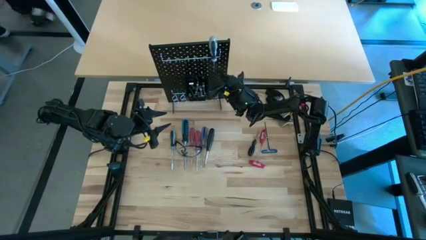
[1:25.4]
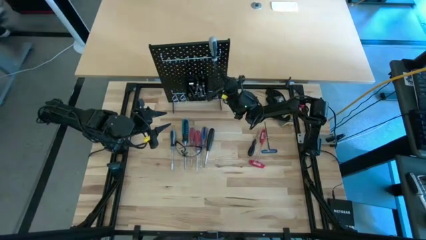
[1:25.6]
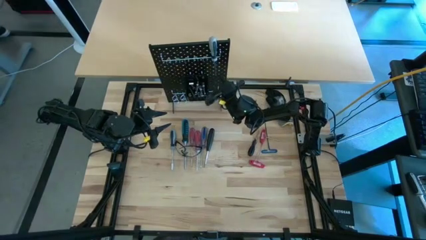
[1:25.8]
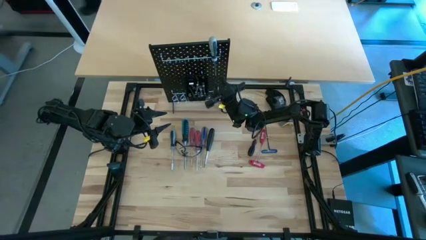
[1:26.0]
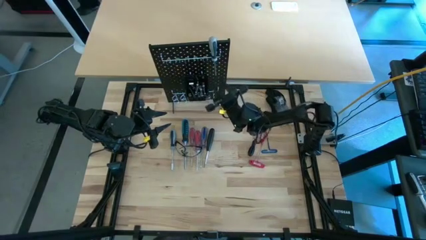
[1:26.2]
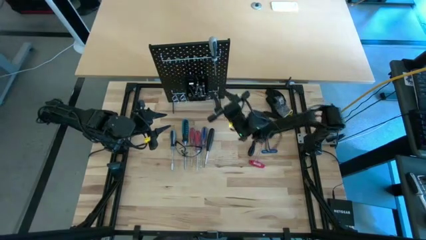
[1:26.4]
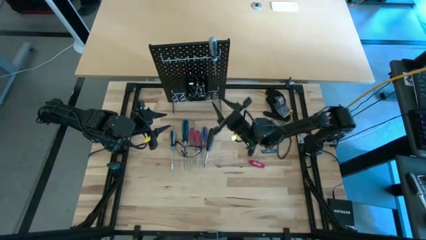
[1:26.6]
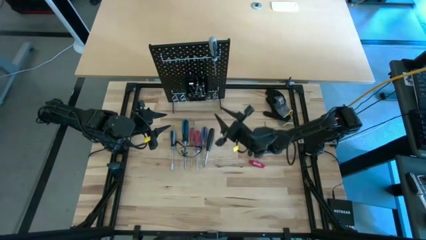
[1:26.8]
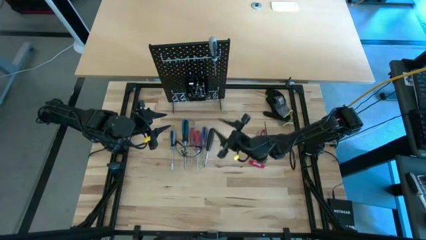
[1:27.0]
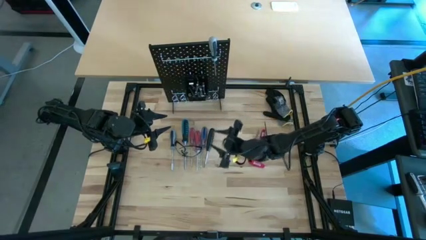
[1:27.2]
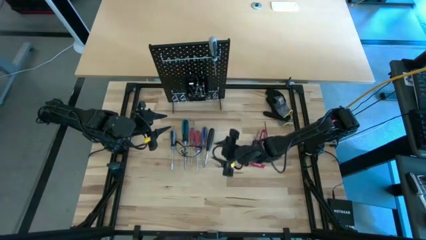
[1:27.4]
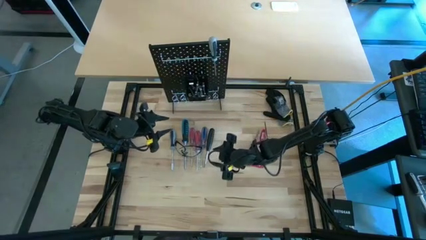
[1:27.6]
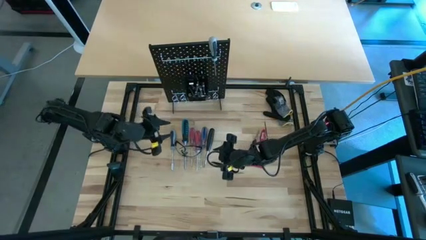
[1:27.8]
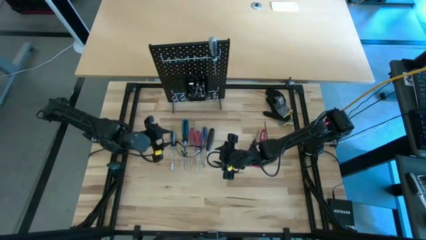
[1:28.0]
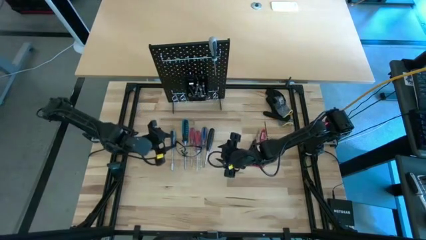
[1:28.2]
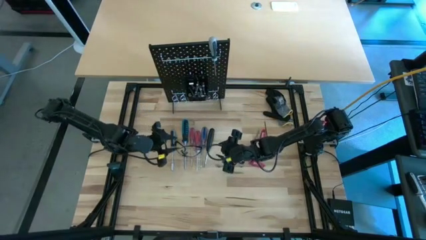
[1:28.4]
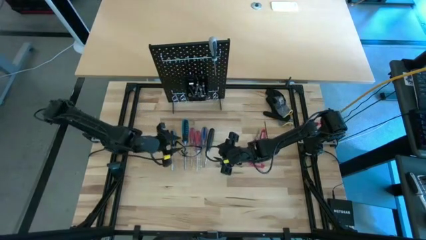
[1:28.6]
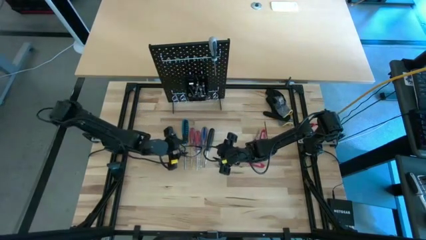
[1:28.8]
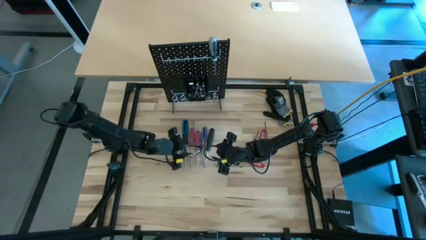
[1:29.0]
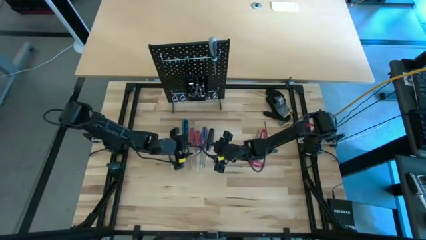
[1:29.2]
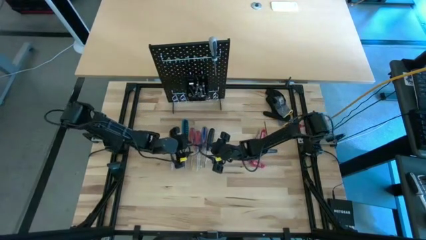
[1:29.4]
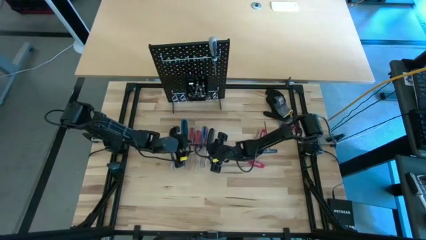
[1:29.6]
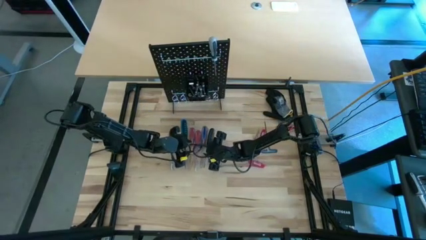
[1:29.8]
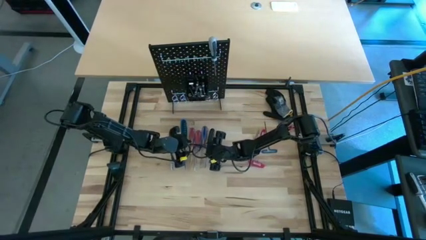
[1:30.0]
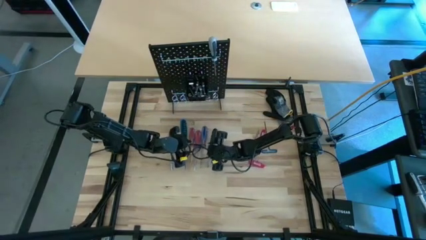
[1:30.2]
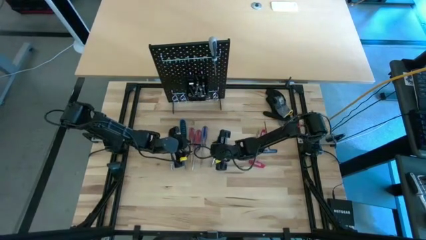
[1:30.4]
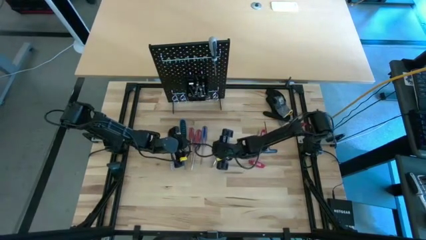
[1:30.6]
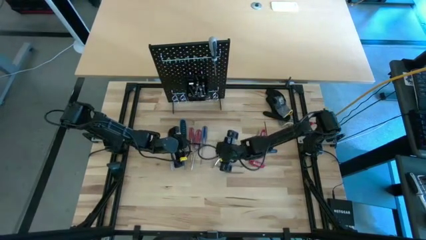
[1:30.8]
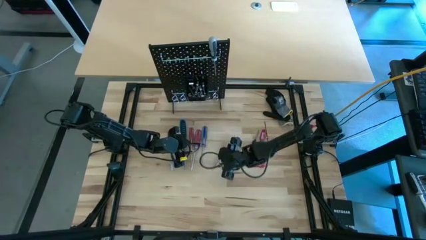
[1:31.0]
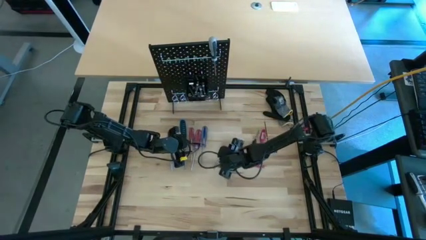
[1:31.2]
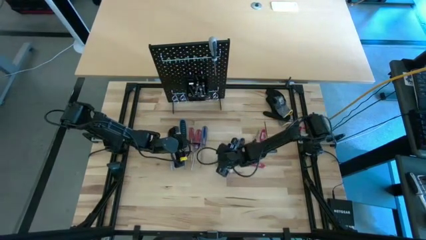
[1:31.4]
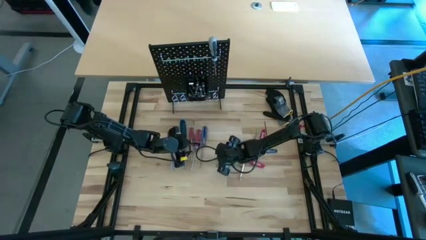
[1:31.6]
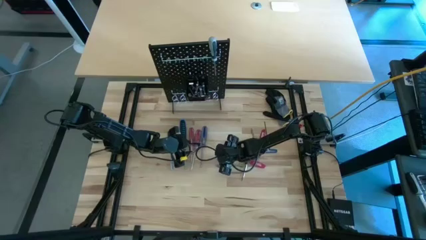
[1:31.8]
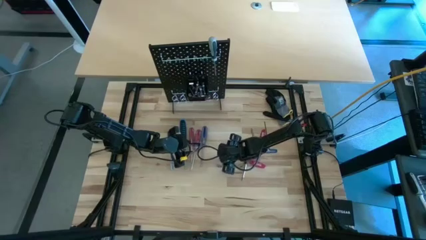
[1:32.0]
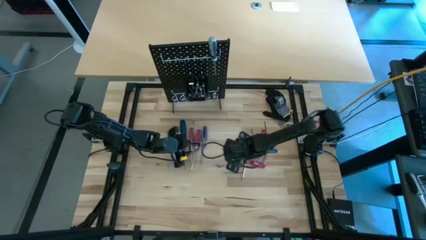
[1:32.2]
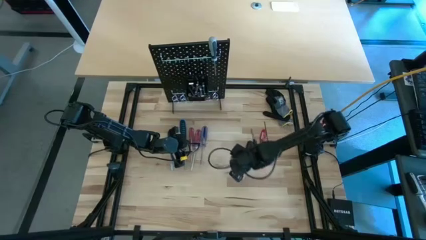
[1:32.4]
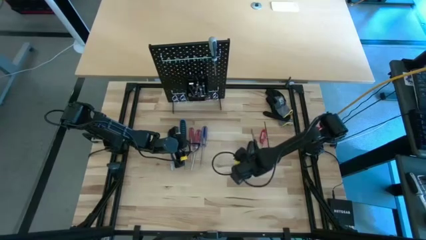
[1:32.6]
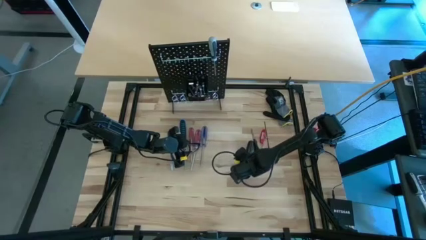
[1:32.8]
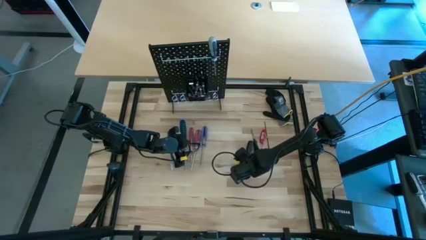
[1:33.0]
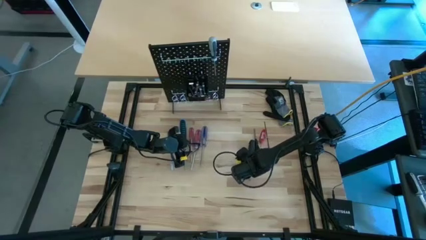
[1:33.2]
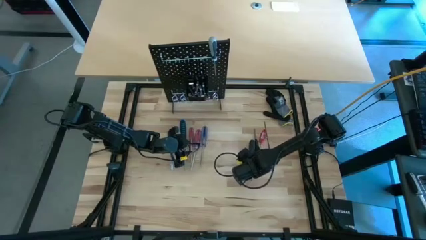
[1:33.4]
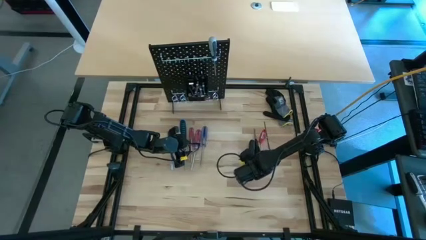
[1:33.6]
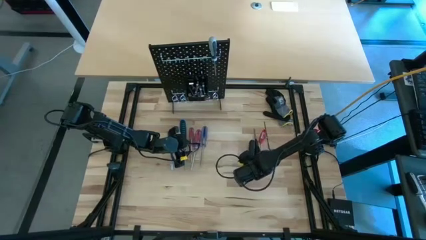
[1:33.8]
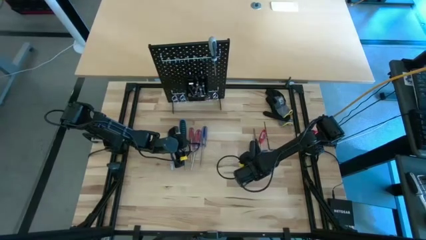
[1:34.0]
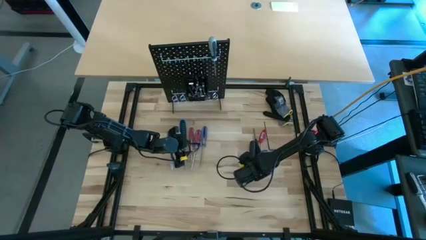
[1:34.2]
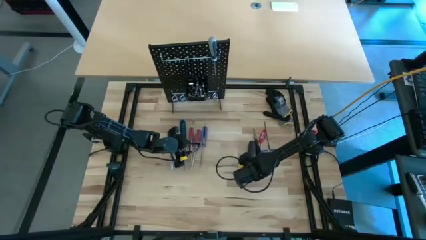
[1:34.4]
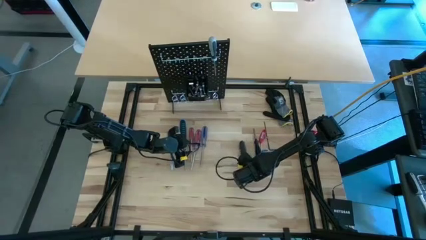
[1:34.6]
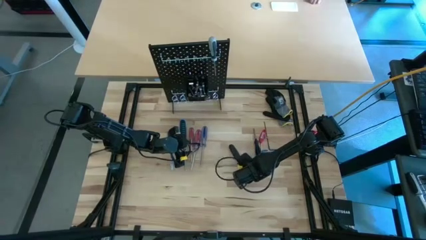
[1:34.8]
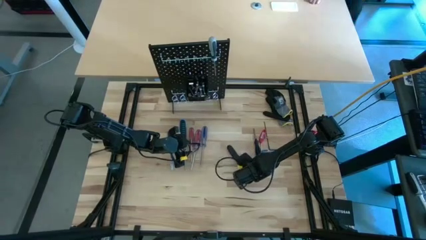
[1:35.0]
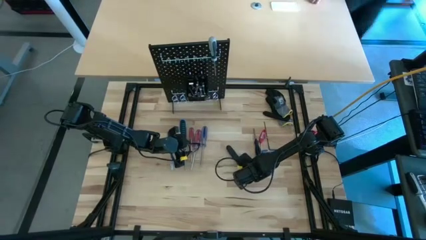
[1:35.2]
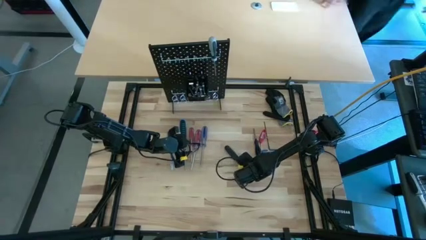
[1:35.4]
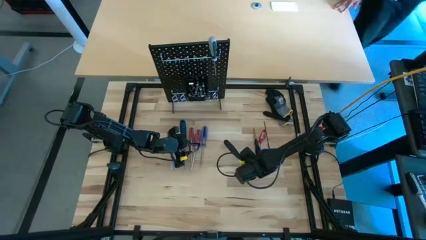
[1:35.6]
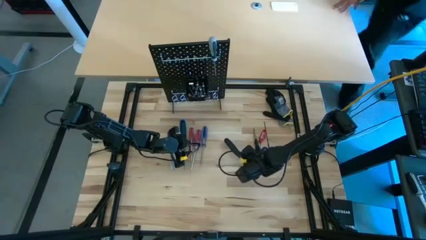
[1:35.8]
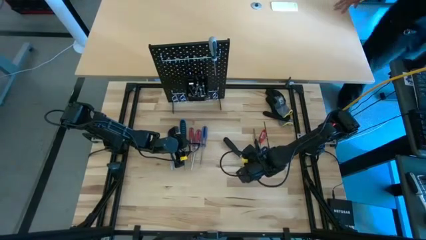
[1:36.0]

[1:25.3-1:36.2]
Task: Hang tools onto peg board
Hang the black ratcheting screwdriver on the peg board

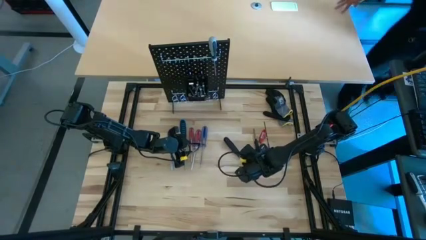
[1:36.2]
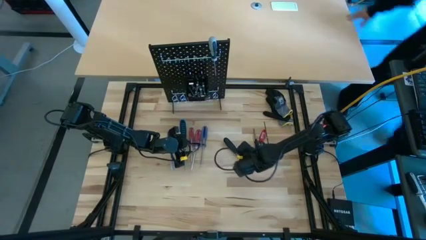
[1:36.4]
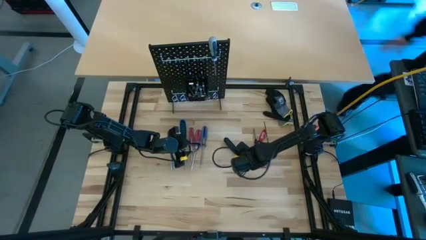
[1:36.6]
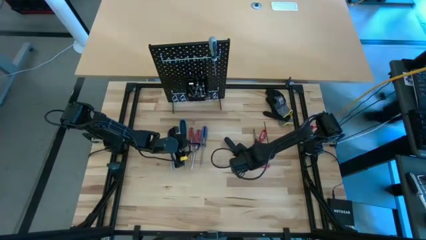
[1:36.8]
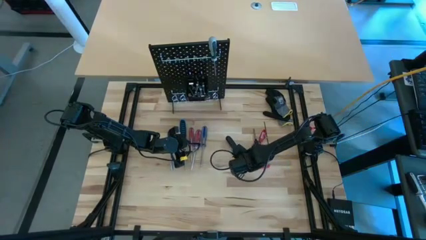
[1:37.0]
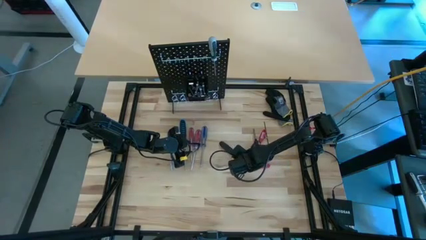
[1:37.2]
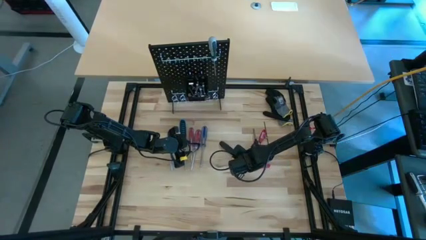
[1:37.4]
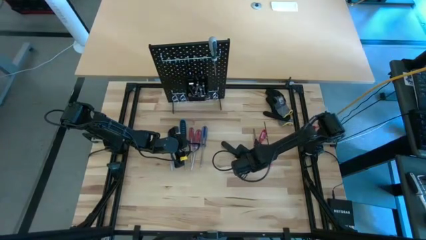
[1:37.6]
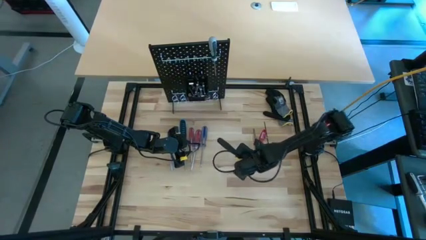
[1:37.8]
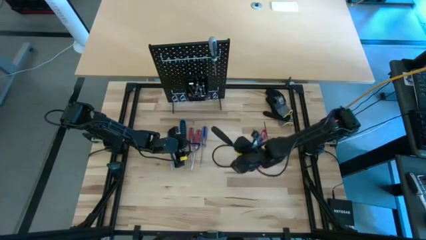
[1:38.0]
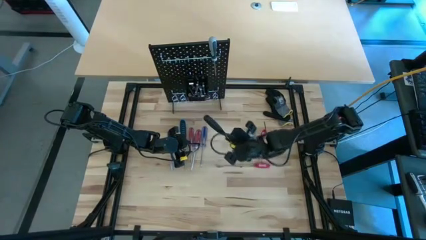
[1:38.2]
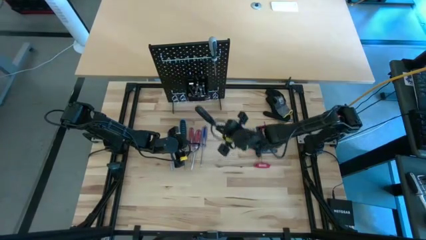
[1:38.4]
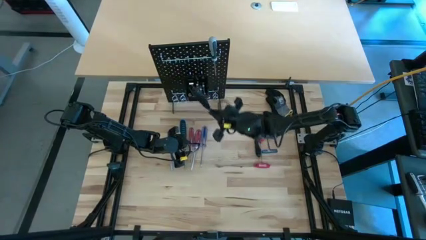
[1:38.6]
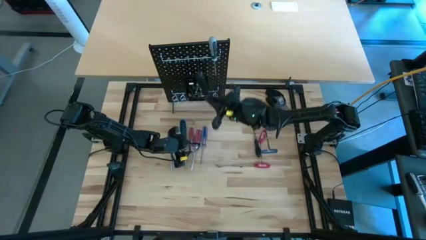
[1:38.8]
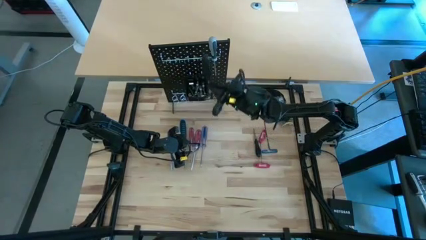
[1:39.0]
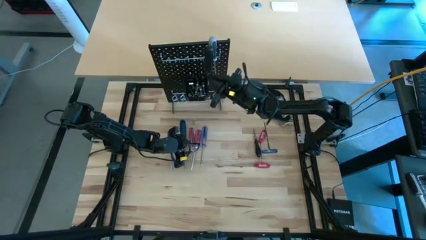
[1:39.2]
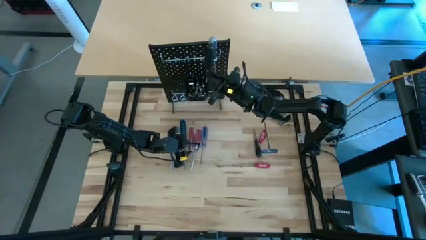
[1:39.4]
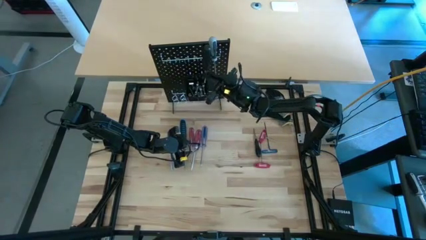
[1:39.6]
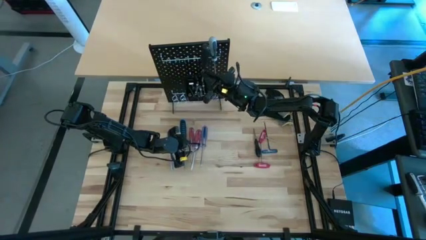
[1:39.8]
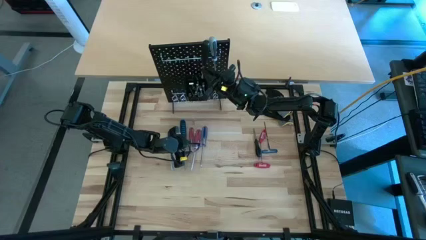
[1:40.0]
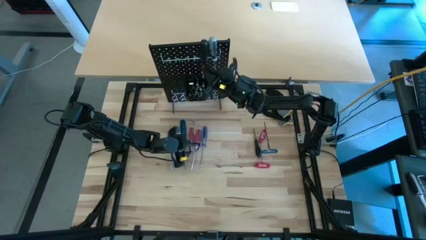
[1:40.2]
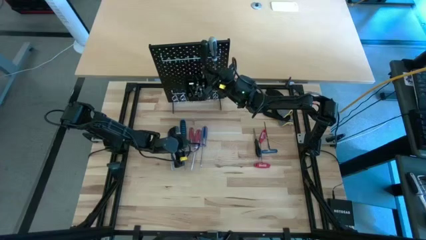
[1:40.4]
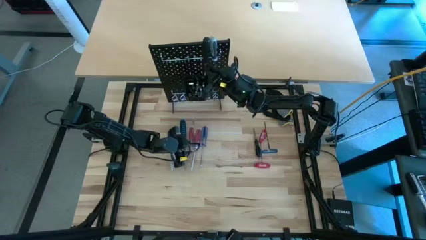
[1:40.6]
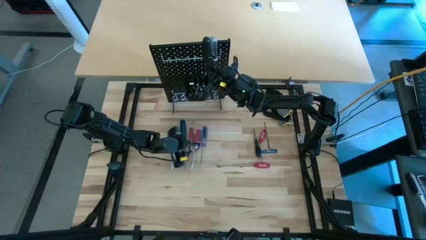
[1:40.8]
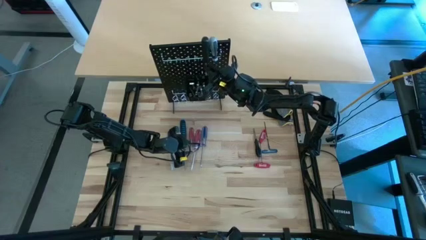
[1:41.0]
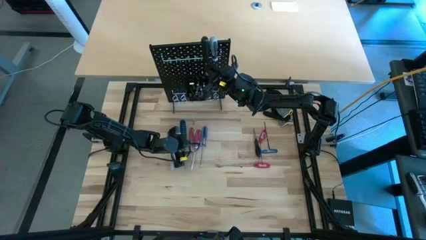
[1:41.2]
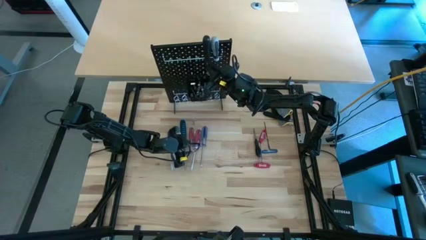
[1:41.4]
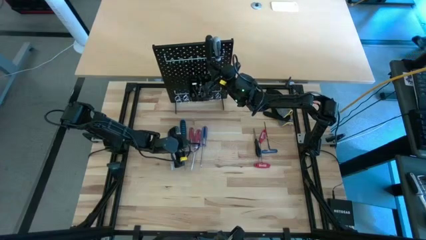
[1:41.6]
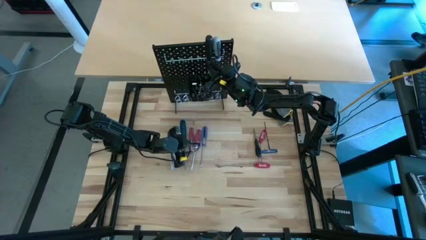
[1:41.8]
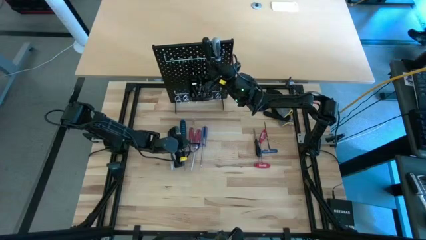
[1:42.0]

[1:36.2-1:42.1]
Hang the black ratcheting screwdriver on the peg board
